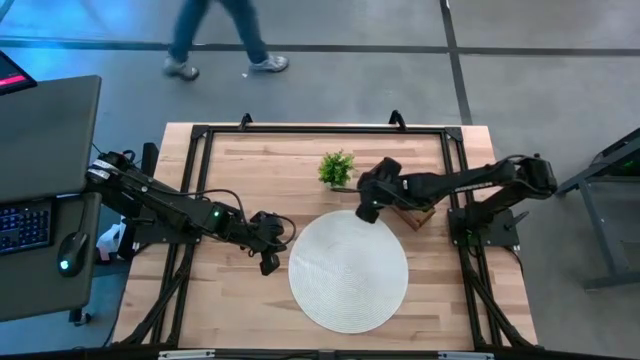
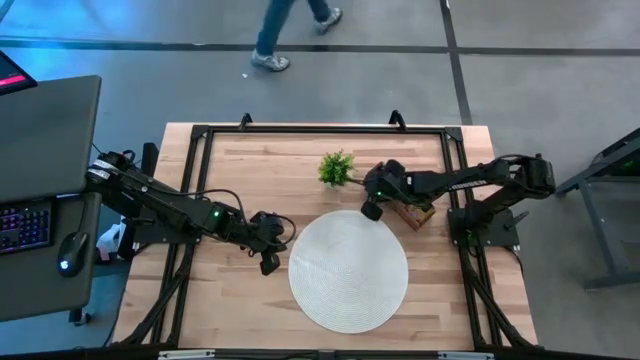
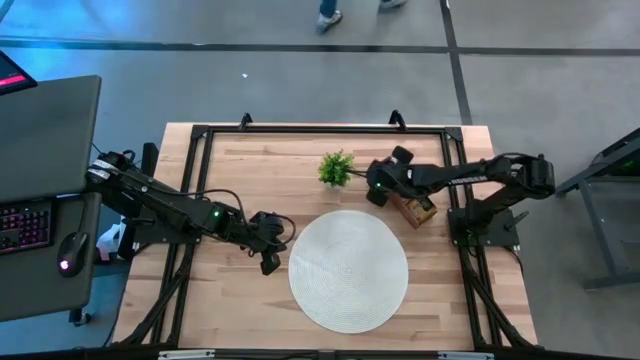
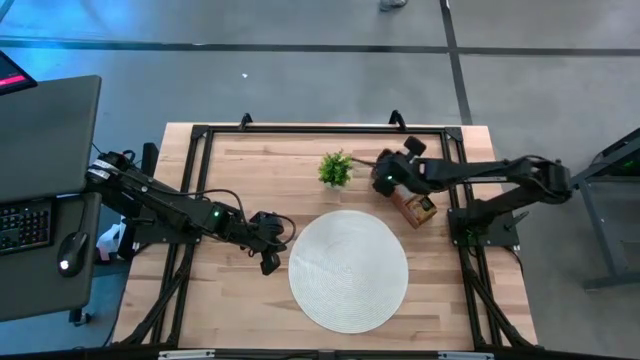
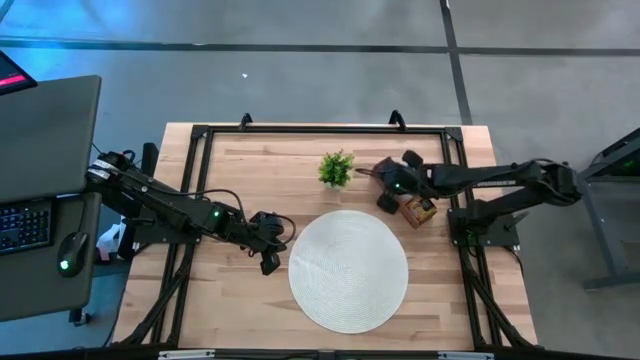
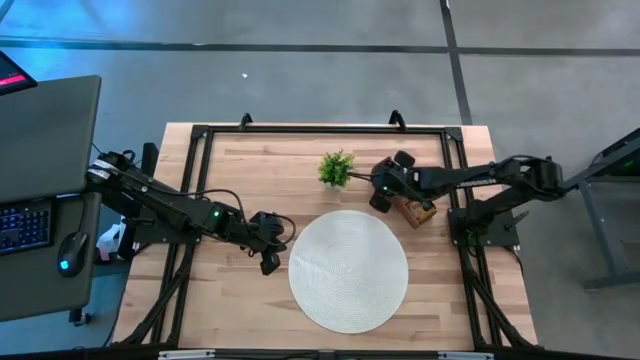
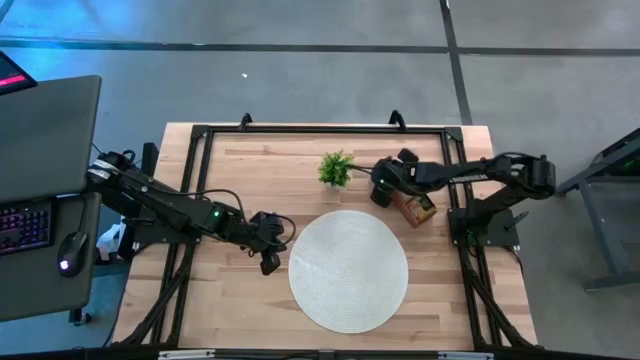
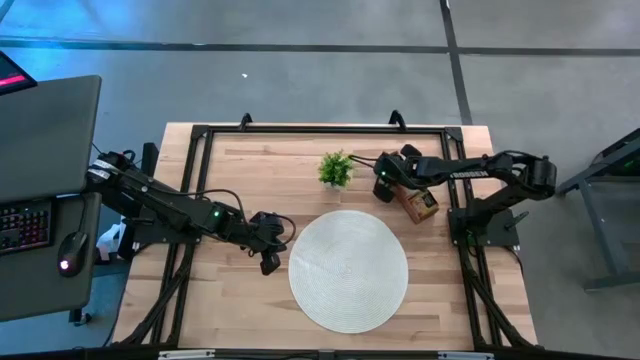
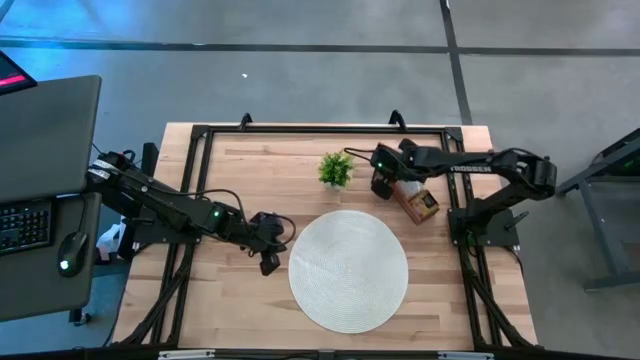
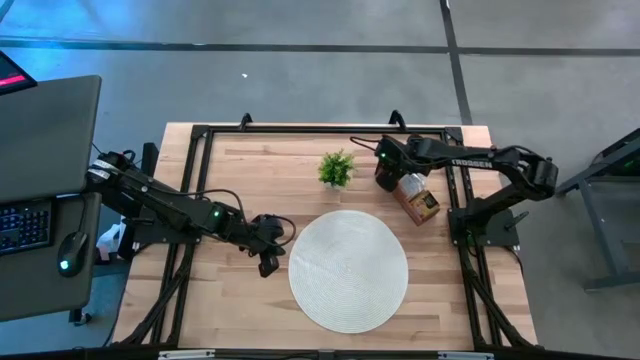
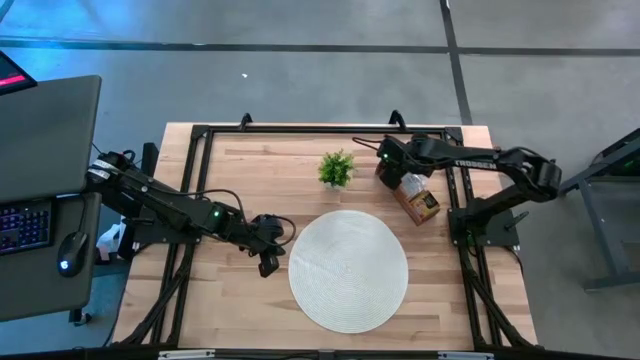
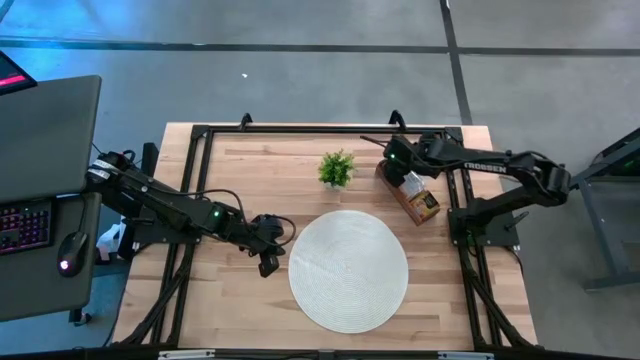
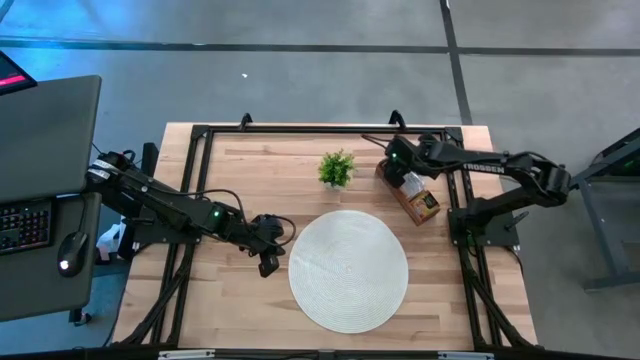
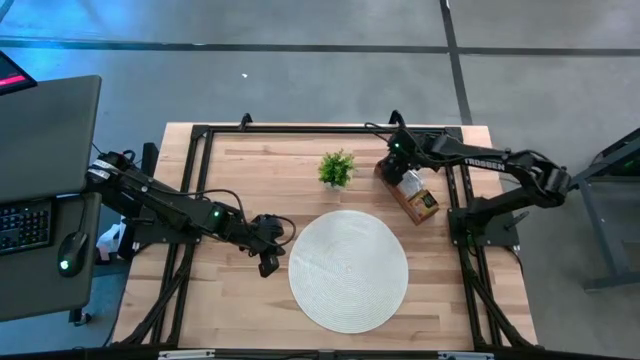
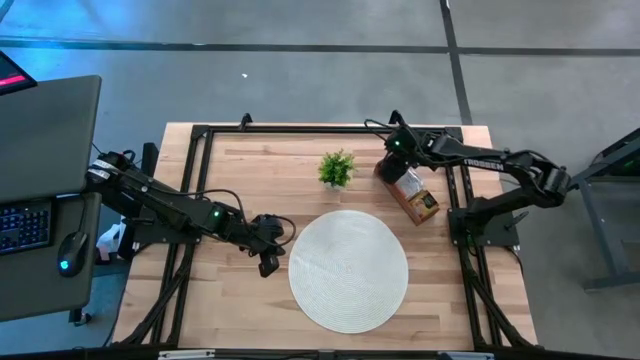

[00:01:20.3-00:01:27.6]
Task: Pick & Place Tea
Adjust the black tea bags in the left section of the wooden organizer

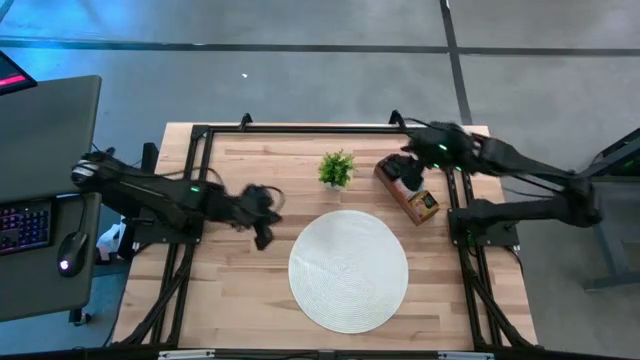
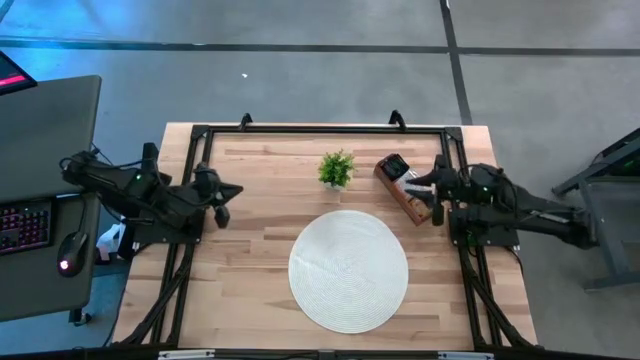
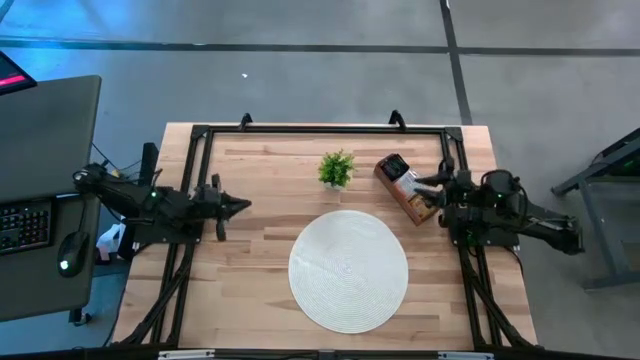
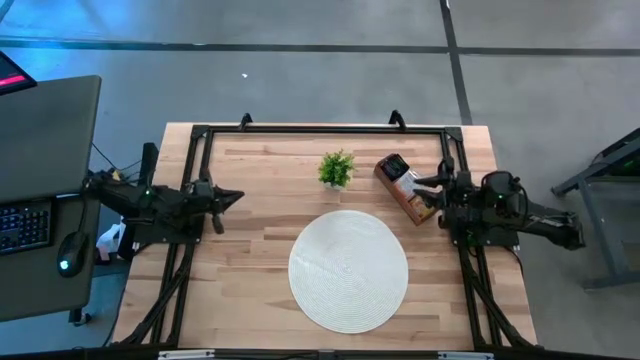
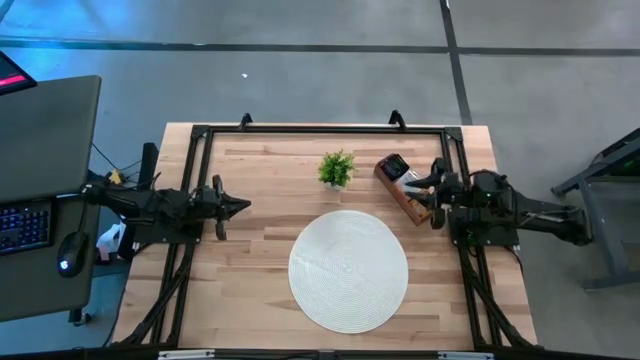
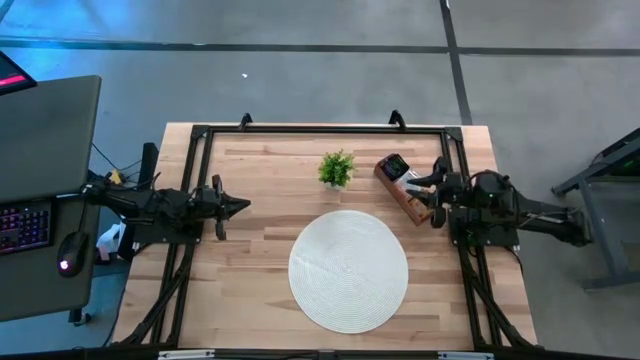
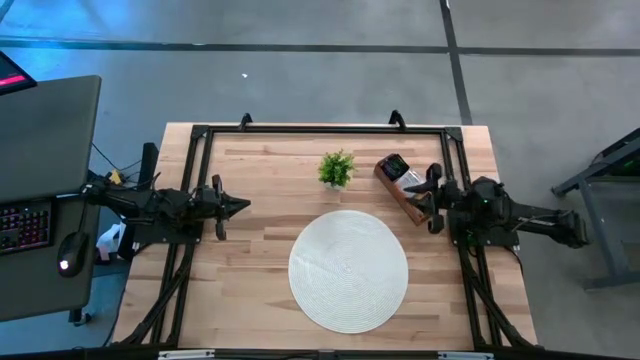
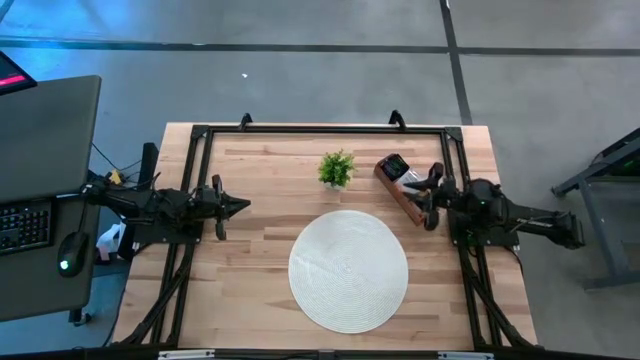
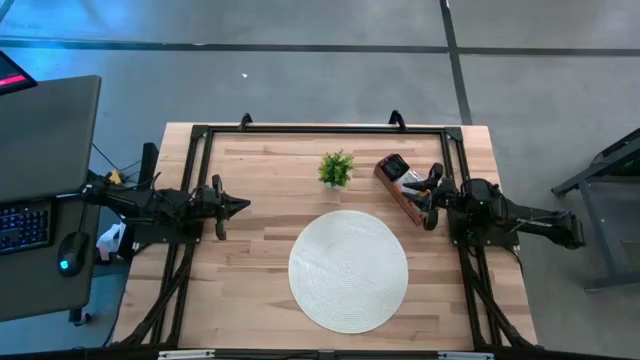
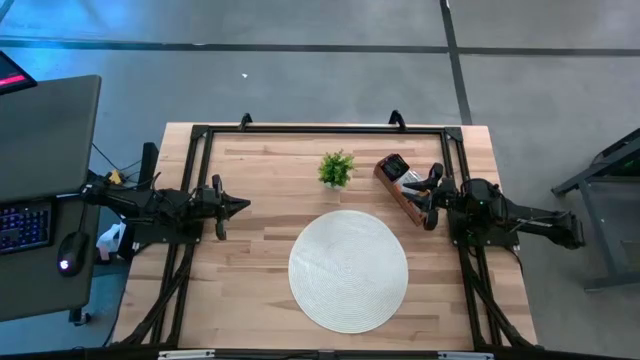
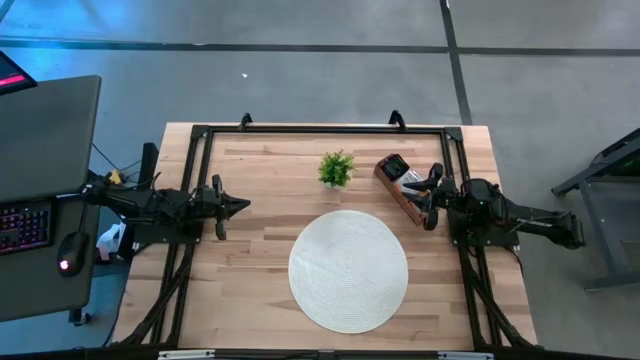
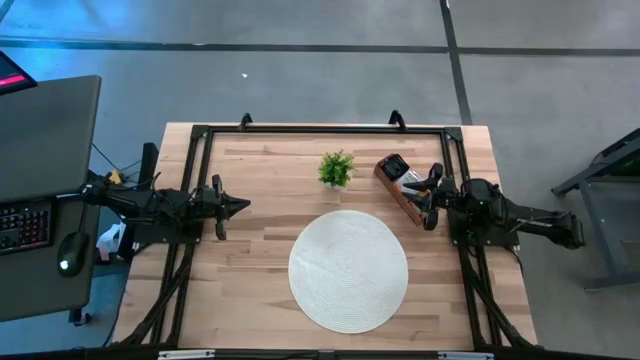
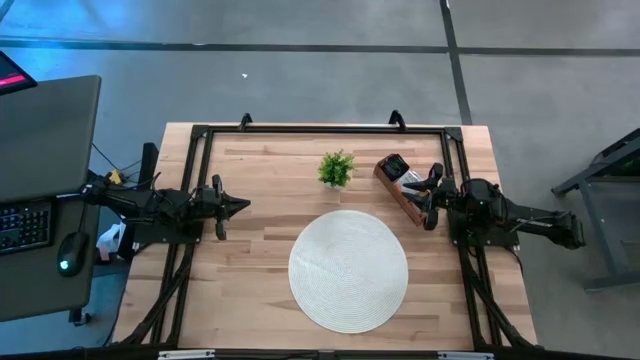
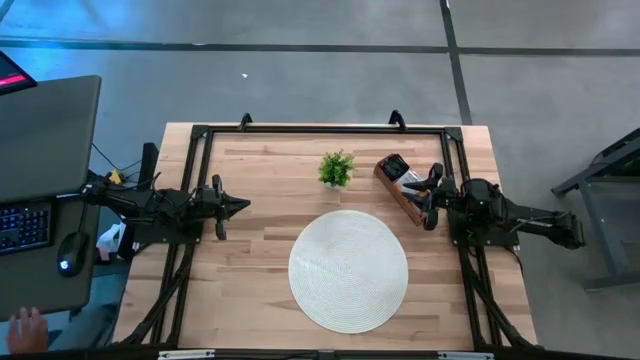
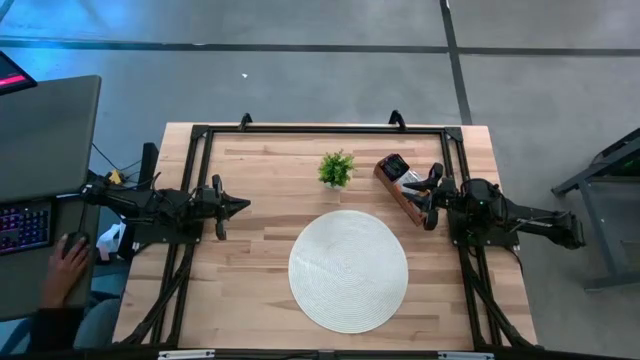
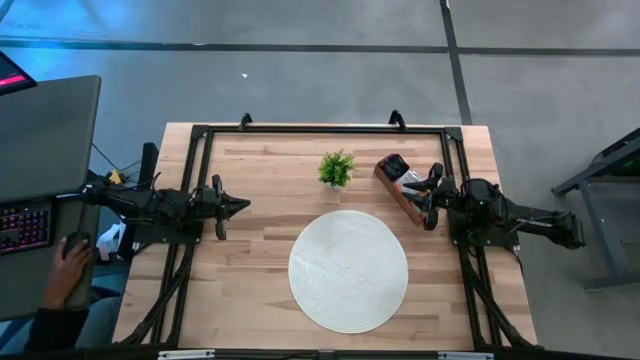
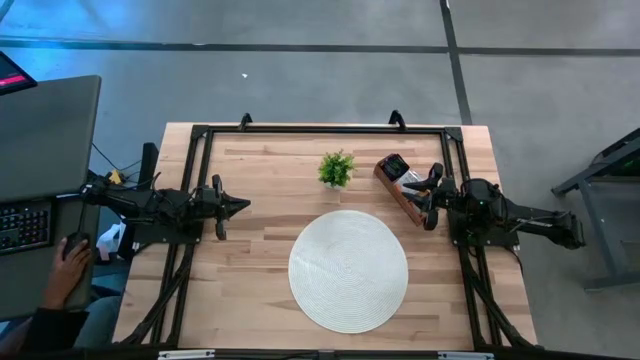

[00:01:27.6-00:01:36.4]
Return to Home Position

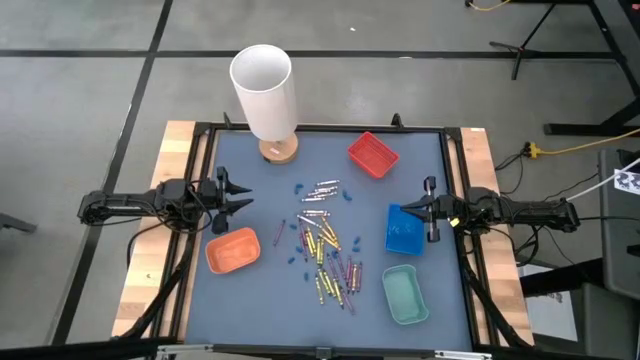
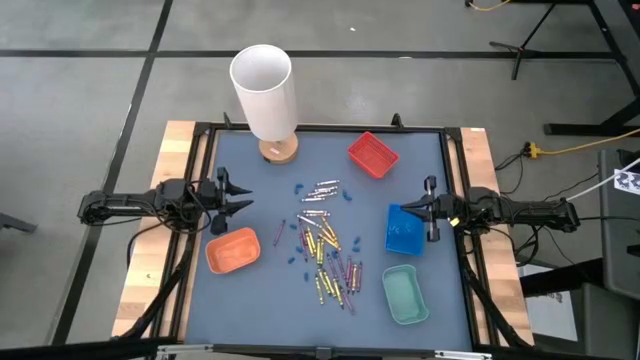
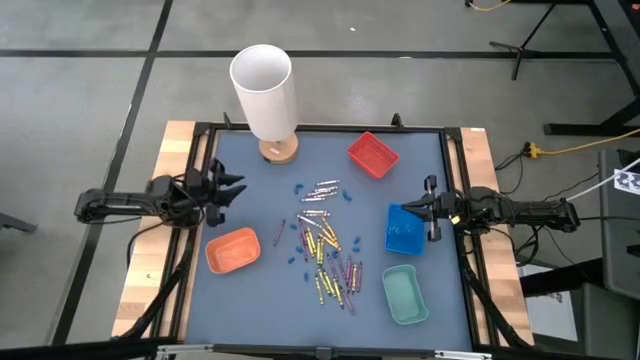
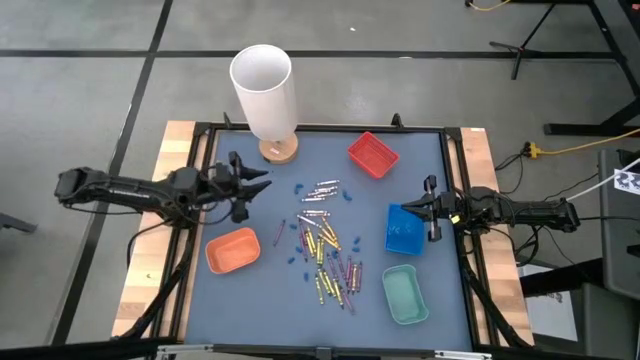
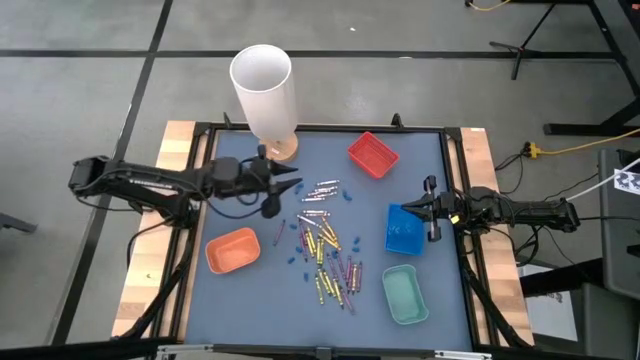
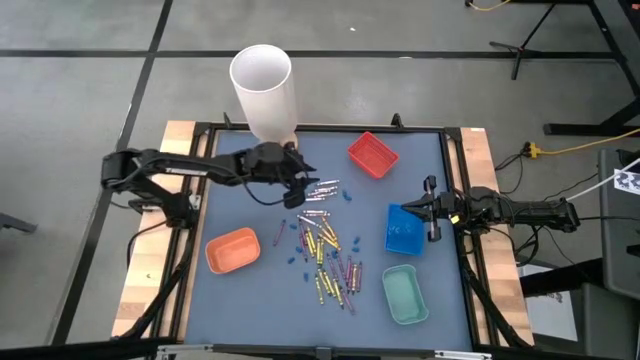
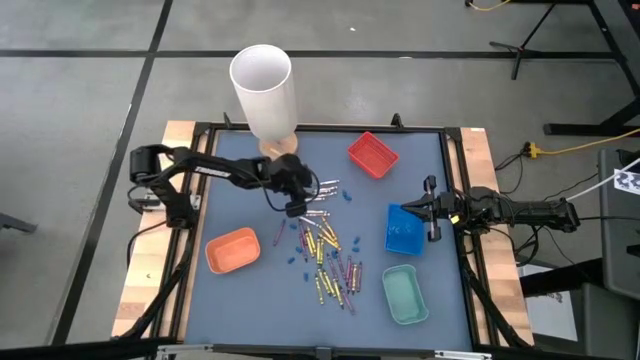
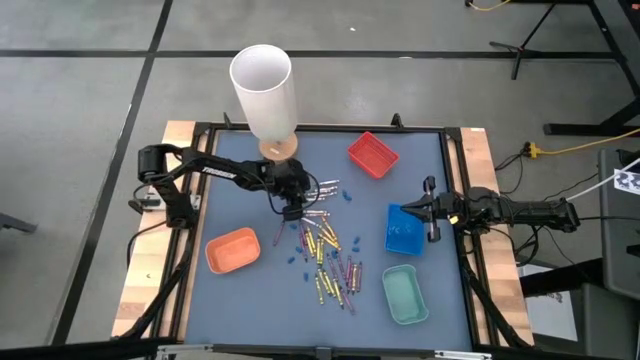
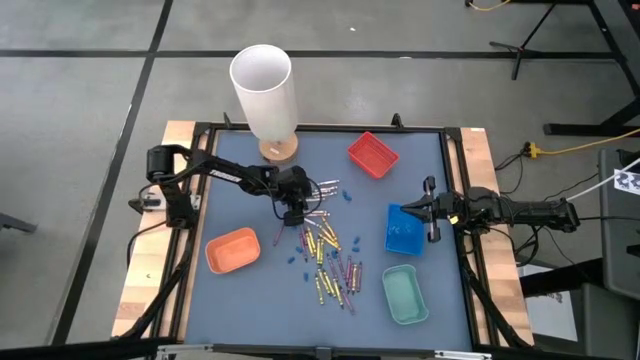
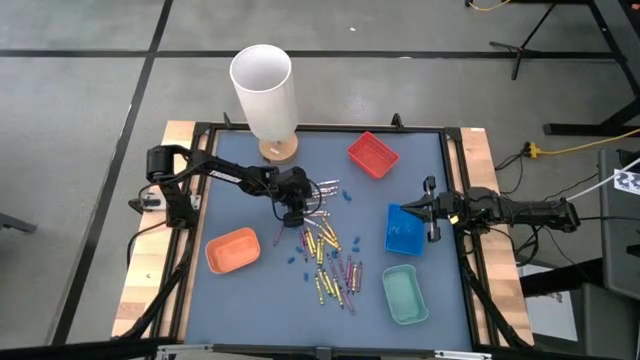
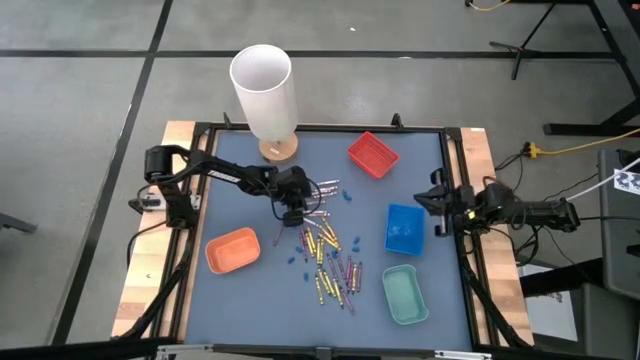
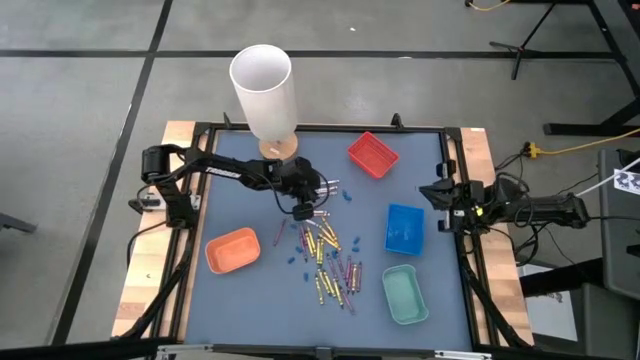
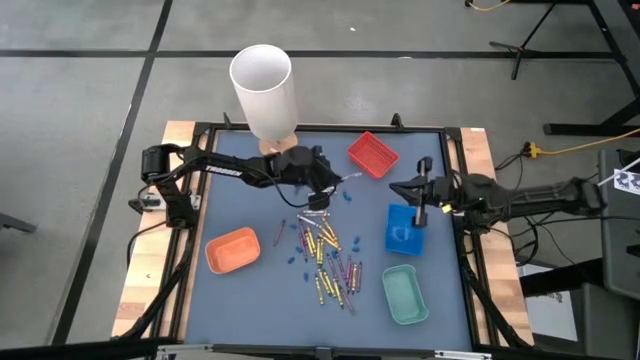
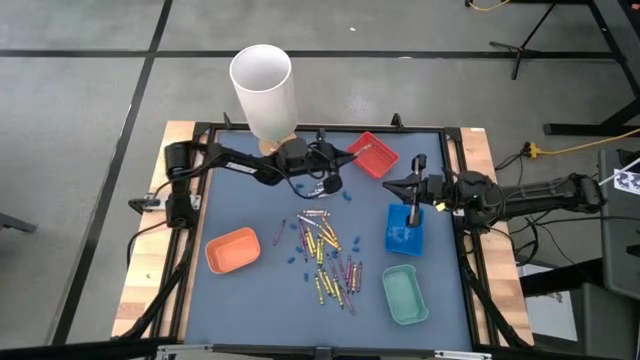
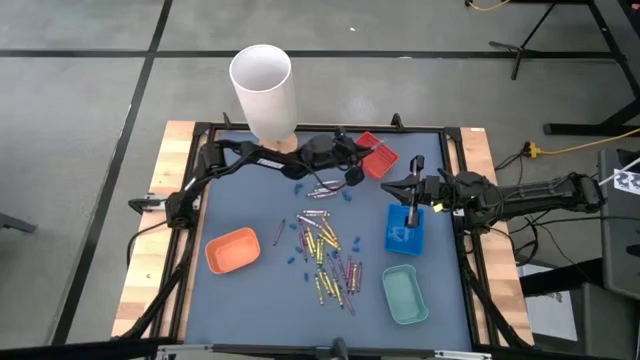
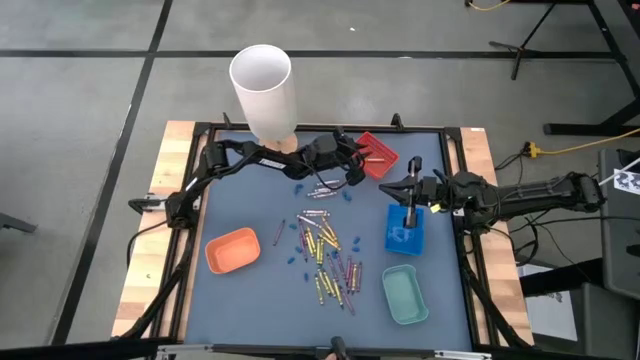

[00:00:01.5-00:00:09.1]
Task: Sort crayons
Put the grey crayon into the red bin
